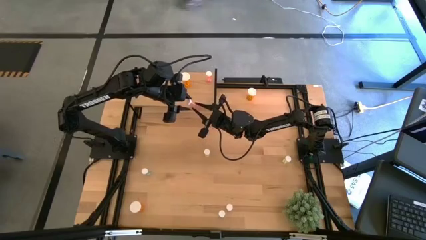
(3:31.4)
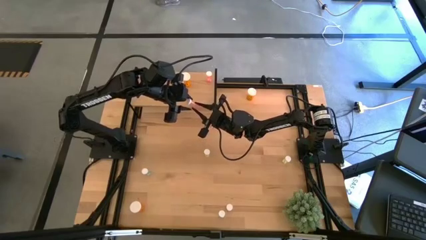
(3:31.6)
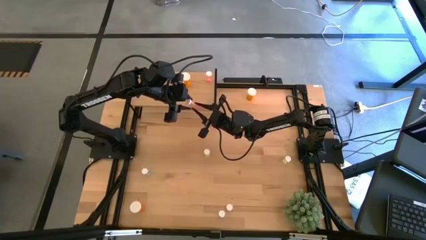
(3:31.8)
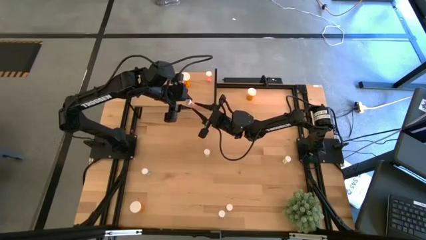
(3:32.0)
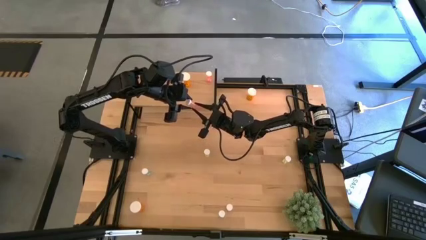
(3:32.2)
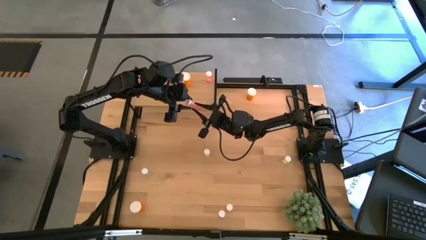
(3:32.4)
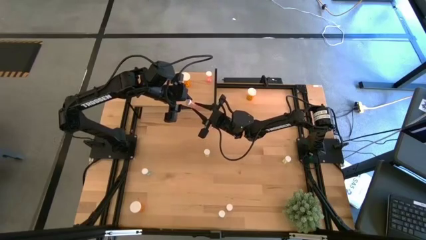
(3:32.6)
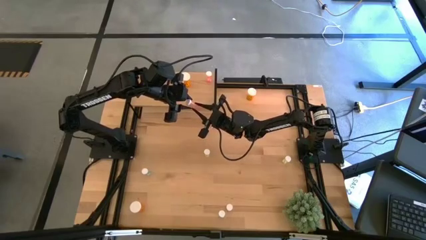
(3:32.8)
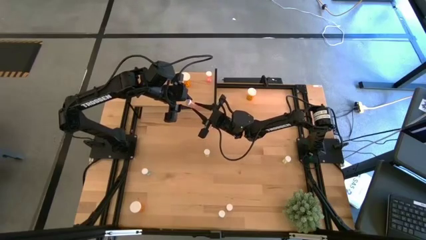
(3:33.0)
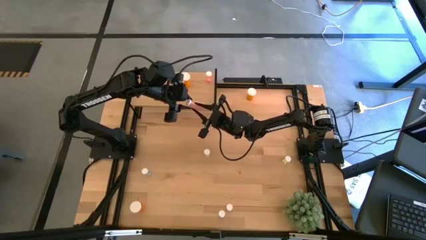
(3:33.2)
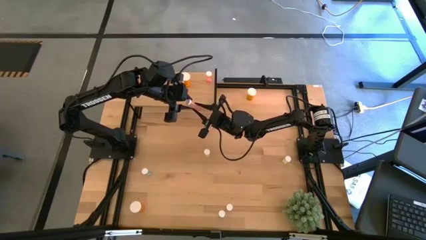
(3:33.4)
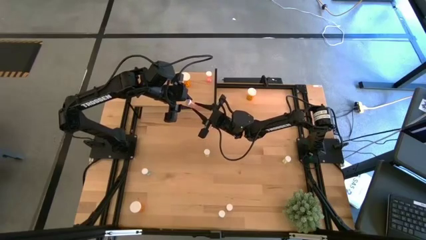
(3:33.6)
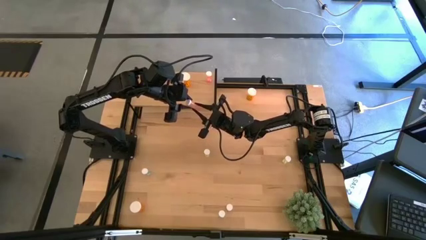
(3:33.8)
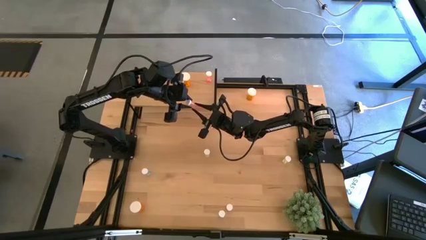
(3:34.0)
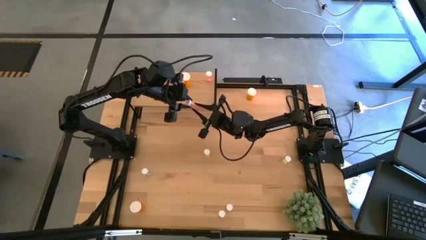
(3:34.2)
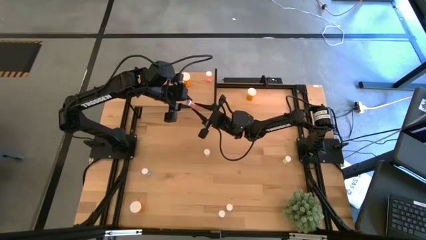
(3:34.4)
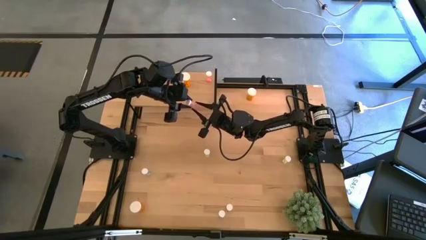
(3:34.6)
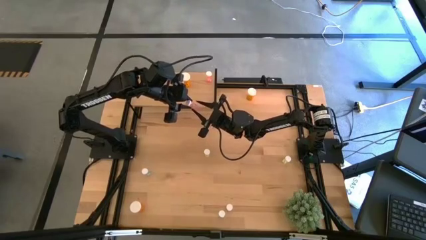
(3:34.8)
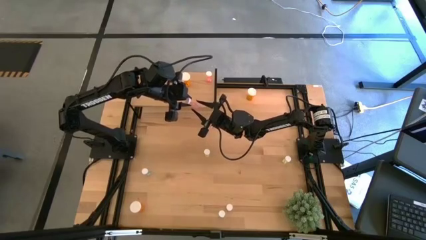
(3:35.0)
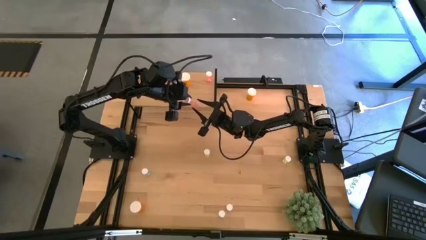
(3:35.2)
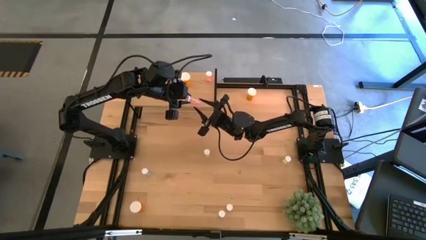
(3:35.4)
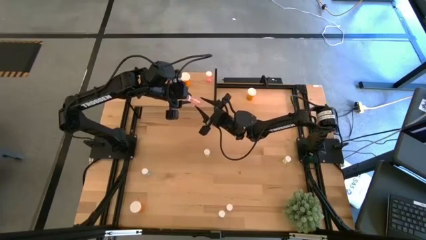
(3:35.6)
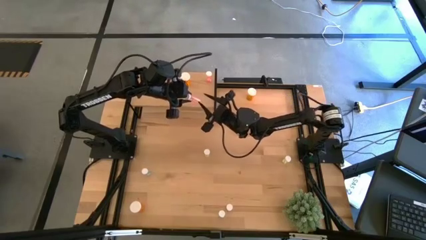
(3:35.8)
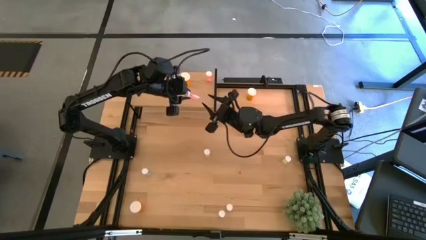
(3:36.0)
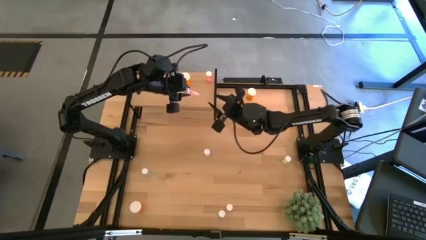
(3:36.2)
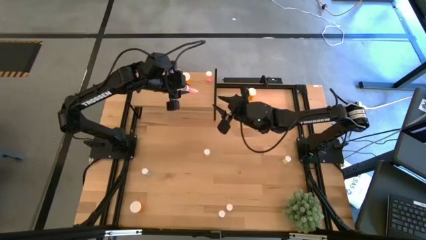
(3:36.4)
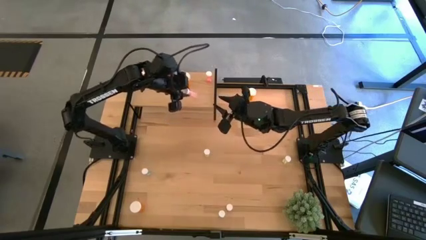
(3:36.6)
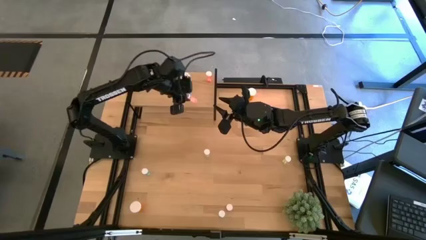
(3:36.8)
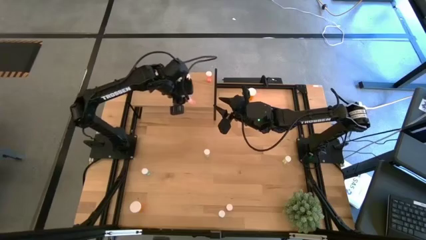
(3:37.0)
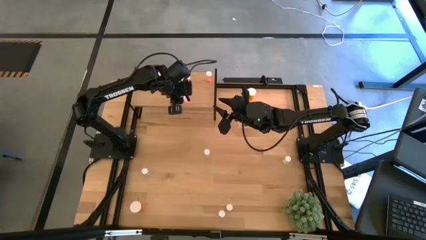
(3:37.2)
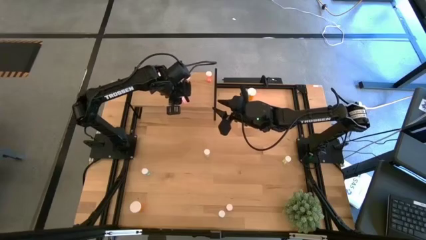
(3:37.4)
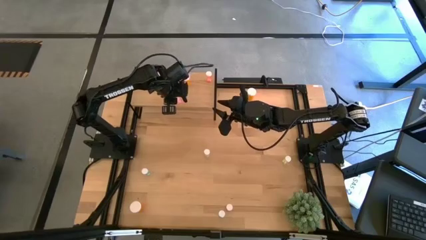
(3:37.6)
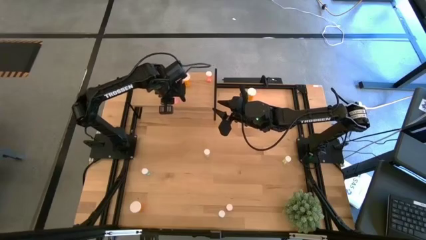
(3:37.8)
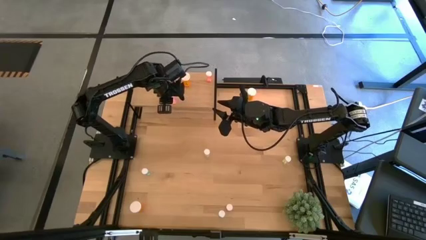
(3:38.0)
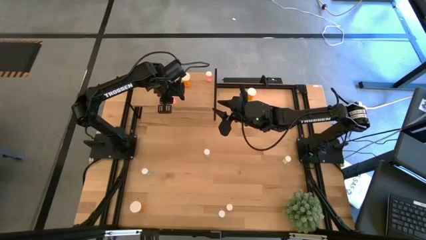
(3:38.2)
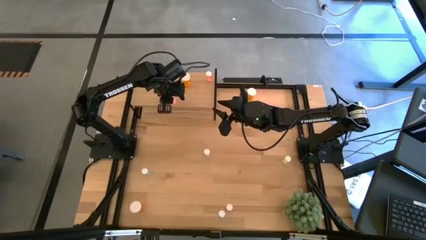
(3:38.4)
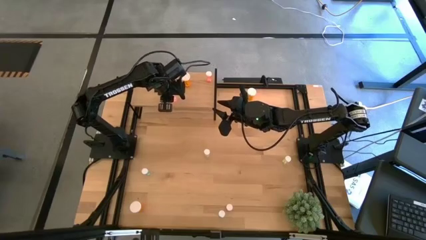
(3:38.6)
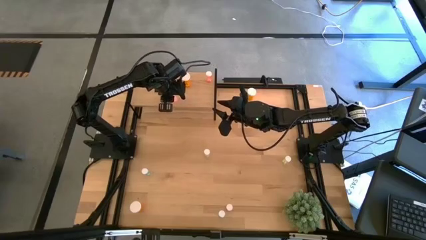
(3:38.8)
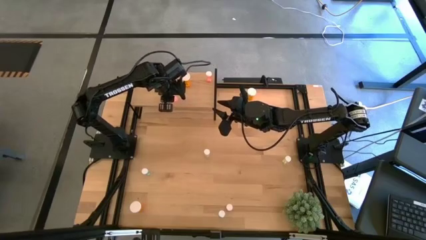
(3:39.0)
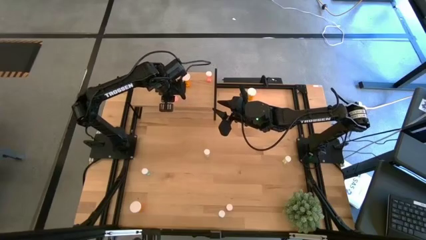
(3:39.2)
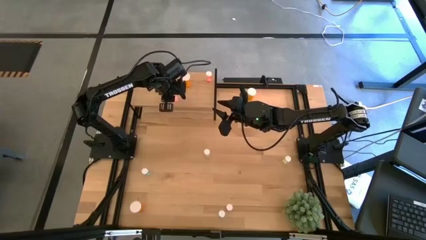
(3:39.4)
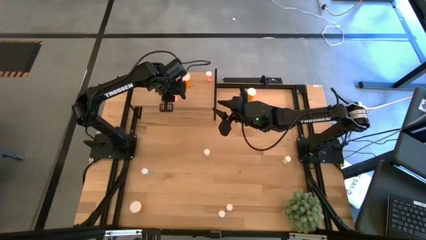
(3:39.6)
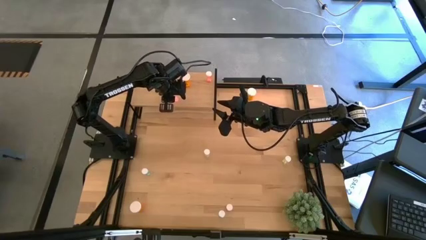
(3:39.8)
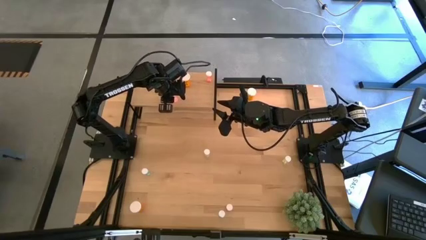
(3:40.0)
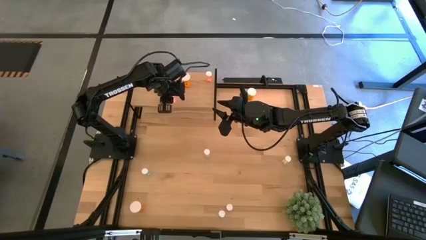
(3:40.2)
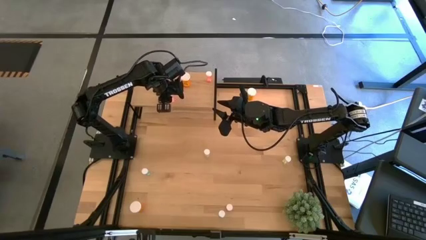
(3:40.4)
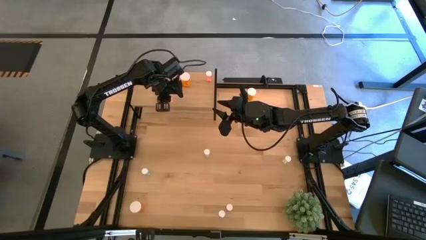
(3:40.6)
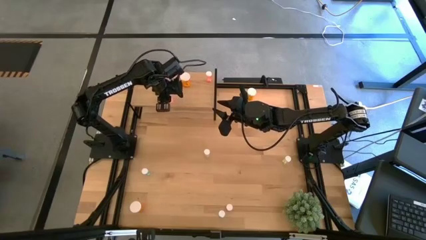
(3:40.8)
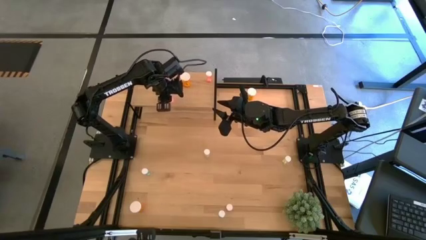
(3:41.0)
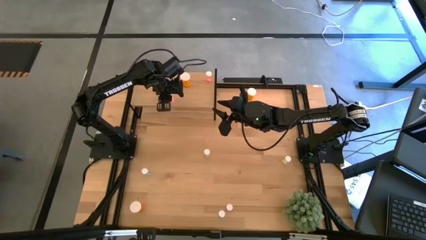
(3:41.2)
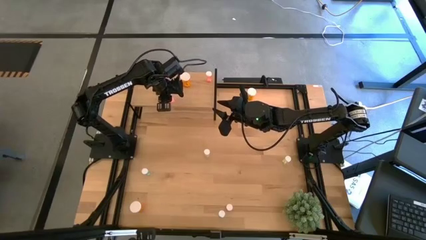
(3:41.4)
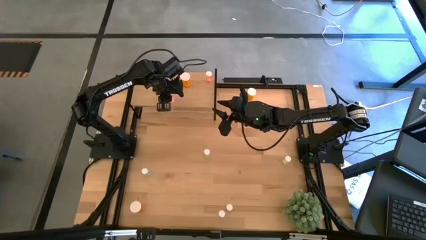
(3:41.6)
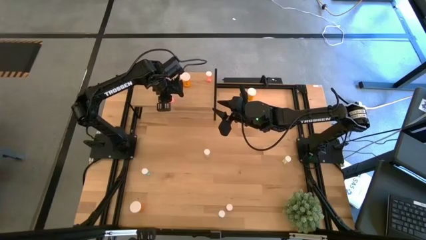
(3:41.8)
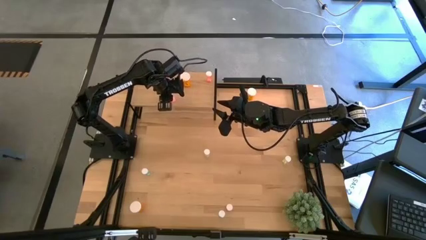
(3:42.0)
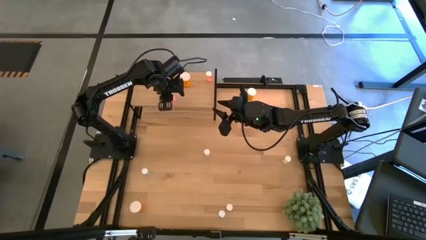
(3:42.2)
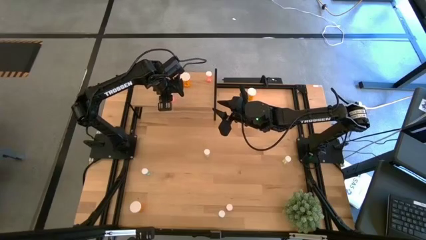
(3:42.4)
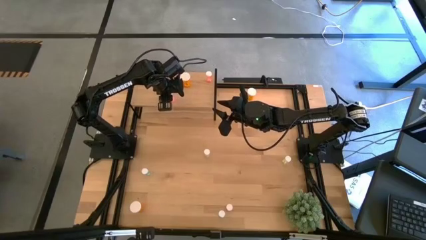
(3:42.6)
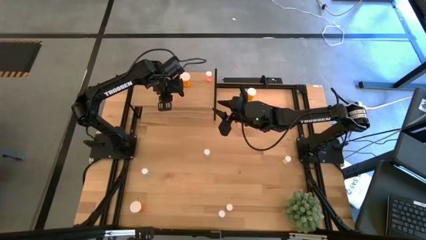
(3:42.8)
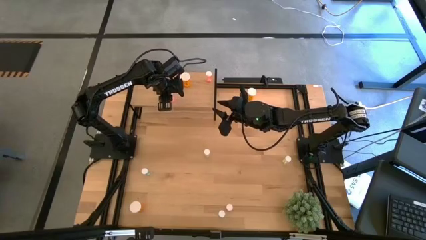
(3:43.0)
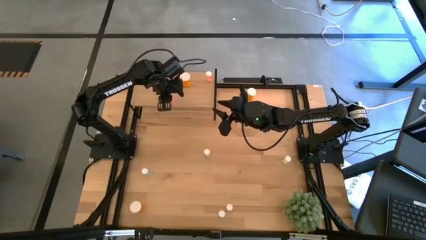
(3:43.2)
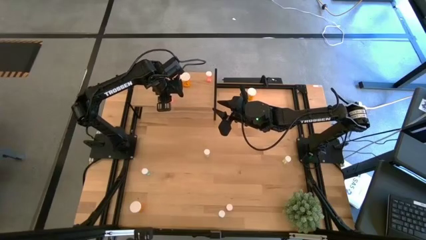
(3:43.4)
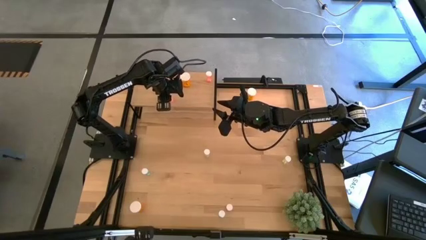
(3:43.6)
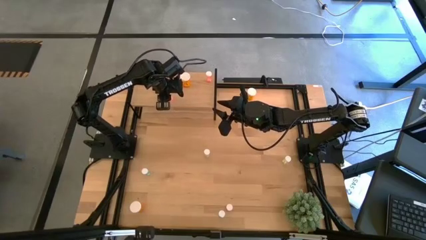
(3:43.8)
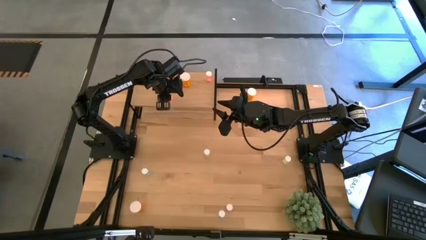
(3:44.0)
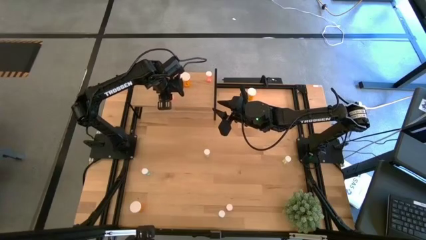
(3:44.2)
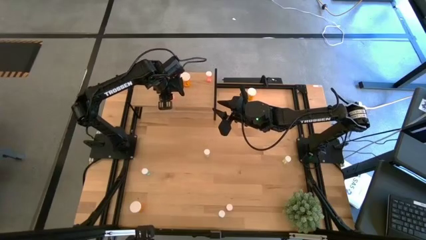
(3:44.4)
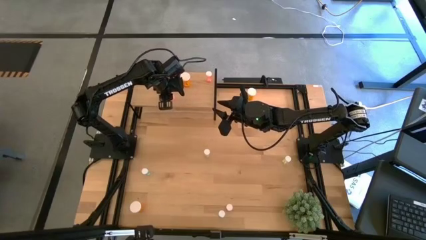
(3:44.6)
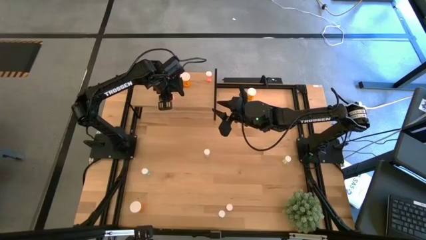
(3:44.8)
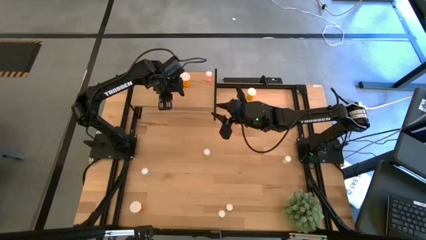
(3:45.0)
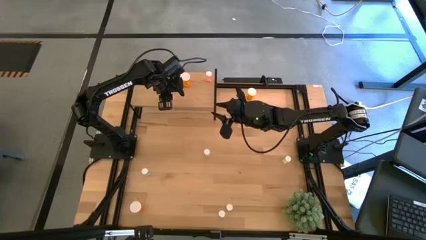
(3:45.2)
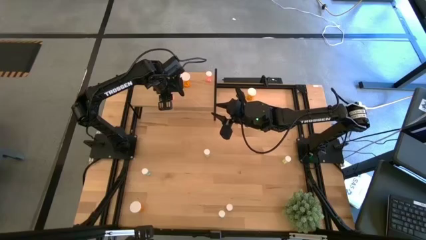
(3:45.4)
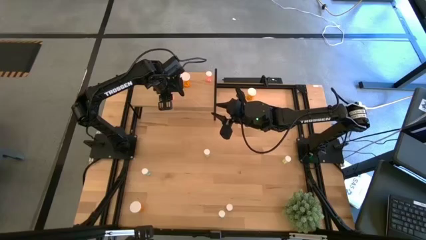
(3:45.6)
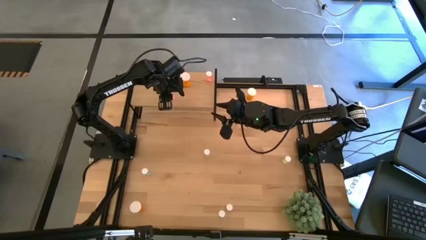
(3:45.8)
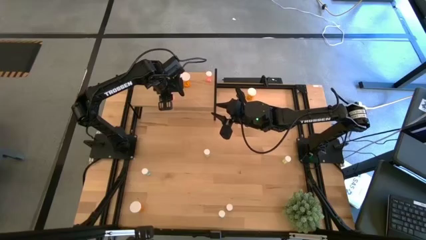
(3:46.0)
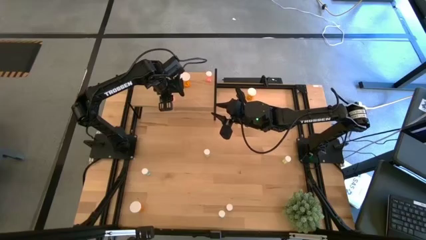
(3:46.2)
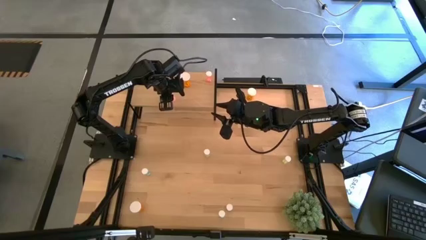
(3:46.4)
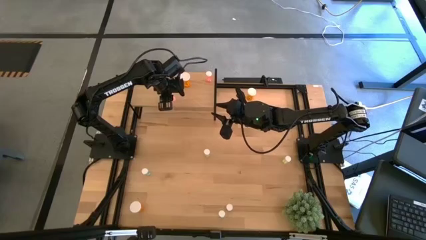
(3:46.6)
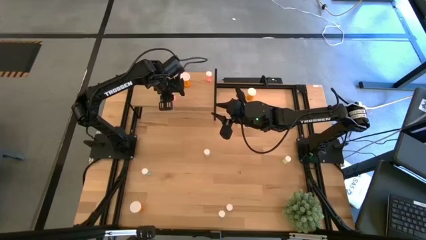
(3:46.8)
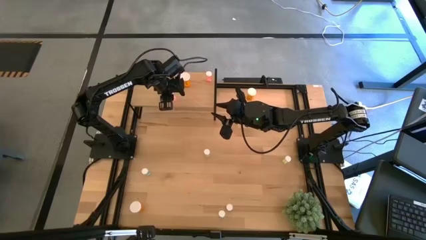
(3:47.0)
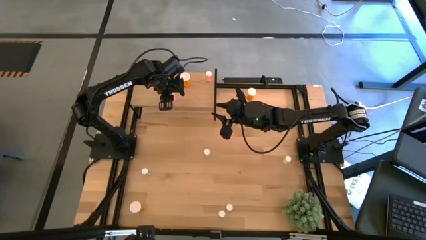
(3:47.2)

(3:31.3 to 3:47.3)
Task: Pick and place medicine bottles onto shelf by color
Put the top red pill bottle on the shelf aligned with the red pill bottle on the shelf
